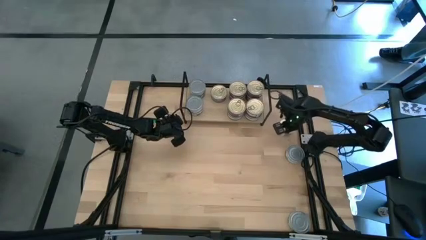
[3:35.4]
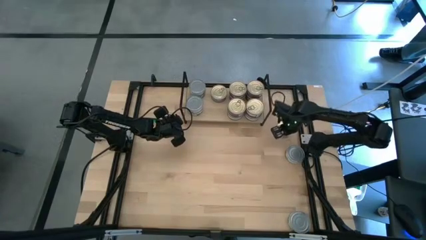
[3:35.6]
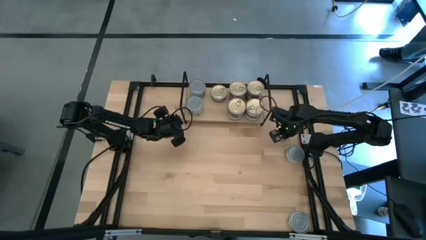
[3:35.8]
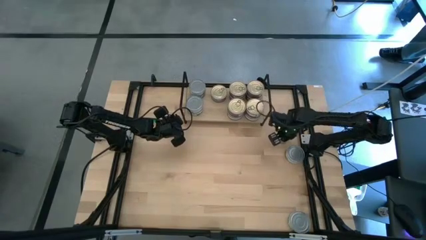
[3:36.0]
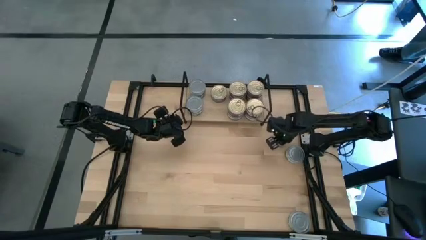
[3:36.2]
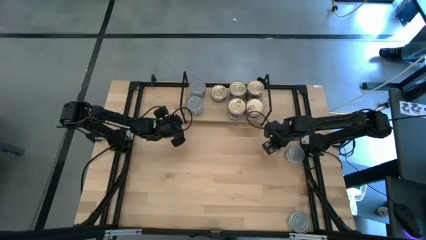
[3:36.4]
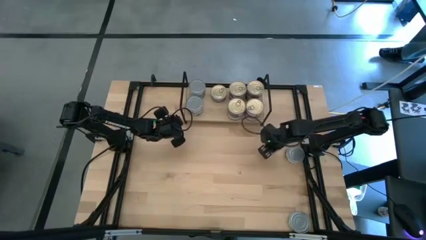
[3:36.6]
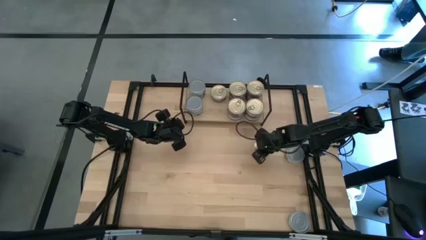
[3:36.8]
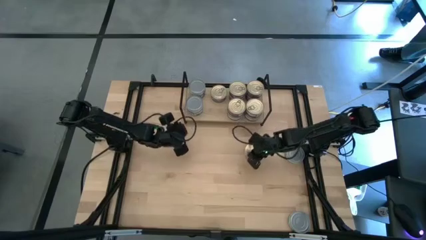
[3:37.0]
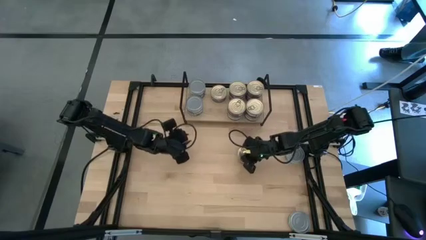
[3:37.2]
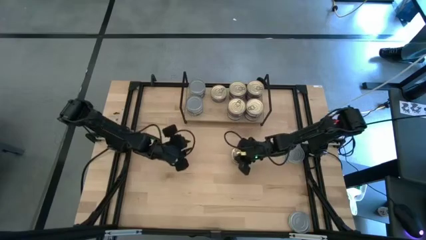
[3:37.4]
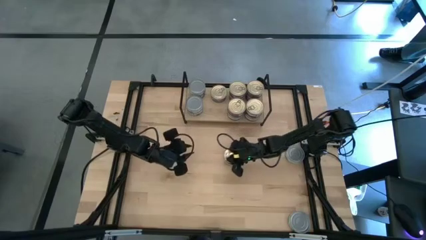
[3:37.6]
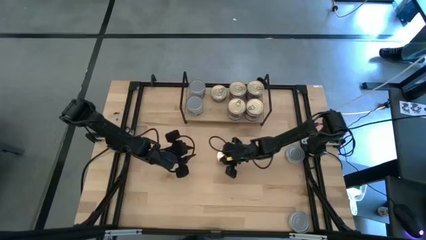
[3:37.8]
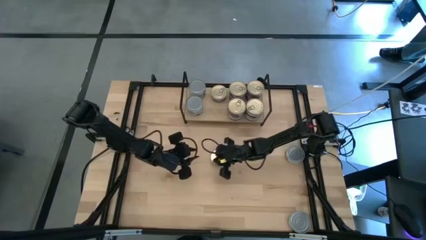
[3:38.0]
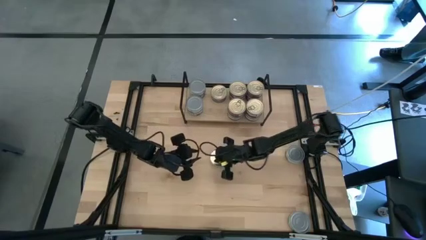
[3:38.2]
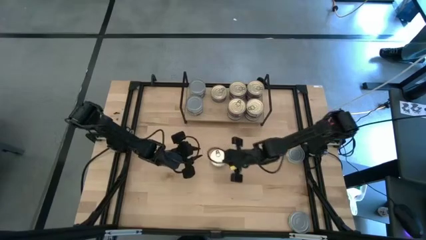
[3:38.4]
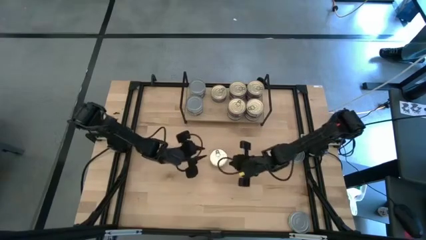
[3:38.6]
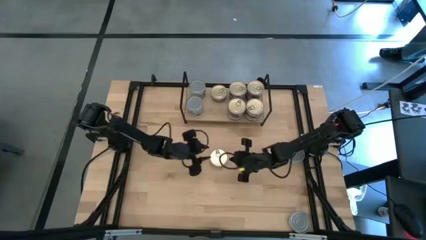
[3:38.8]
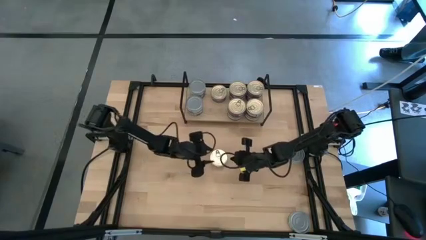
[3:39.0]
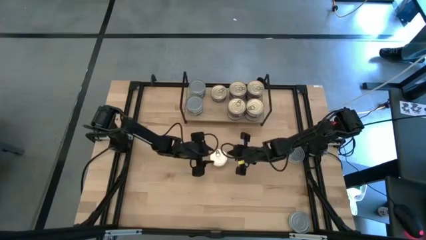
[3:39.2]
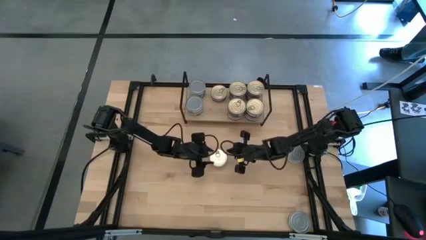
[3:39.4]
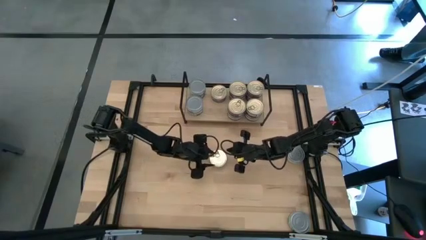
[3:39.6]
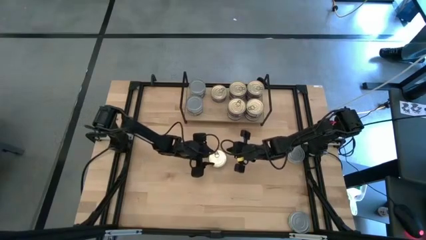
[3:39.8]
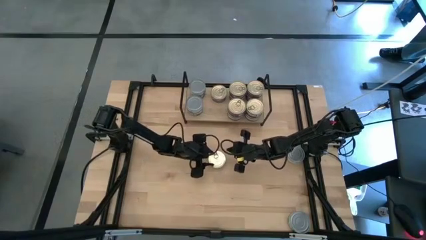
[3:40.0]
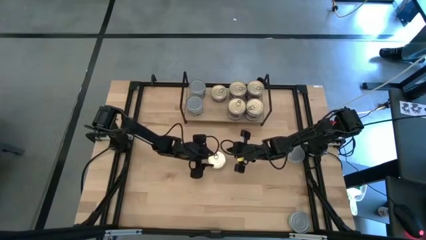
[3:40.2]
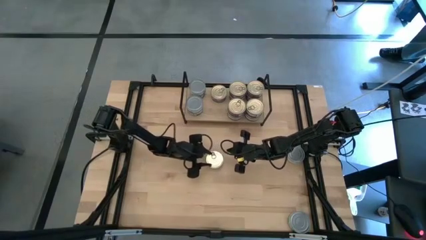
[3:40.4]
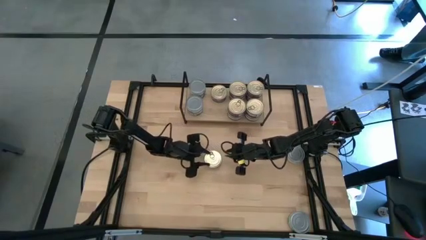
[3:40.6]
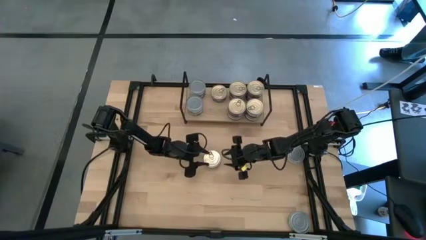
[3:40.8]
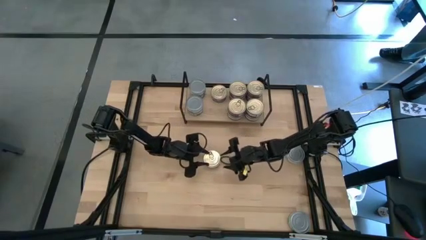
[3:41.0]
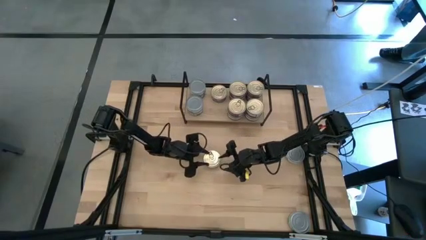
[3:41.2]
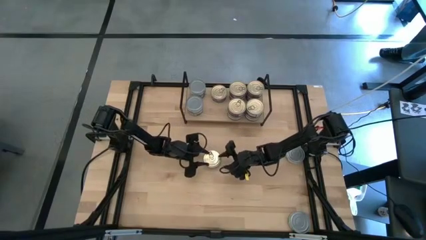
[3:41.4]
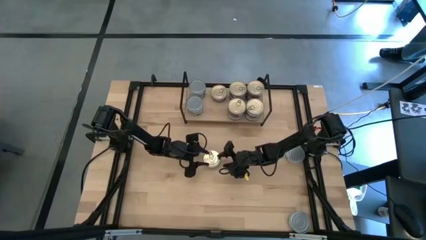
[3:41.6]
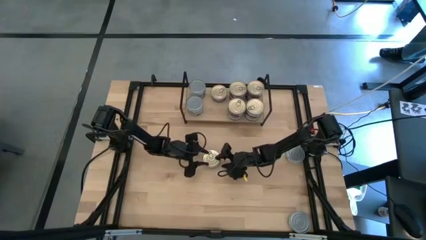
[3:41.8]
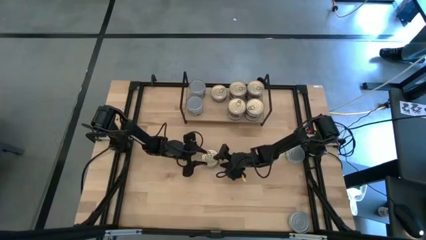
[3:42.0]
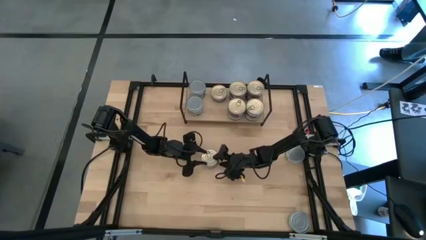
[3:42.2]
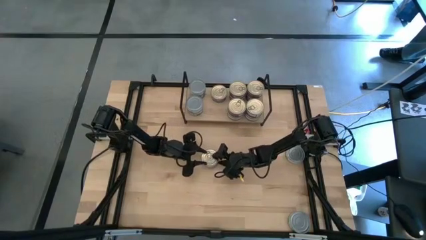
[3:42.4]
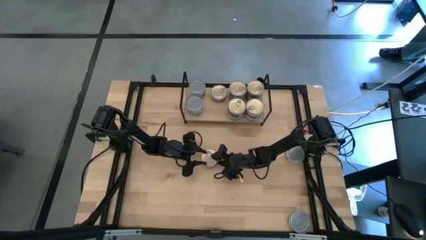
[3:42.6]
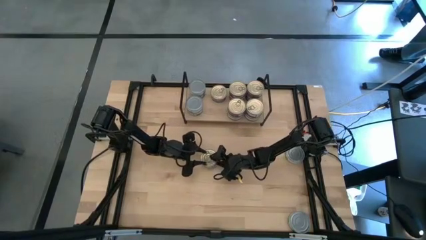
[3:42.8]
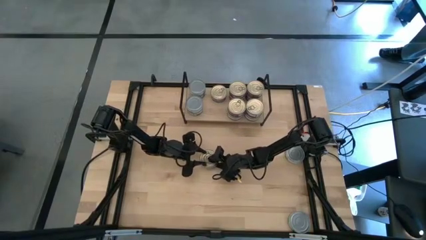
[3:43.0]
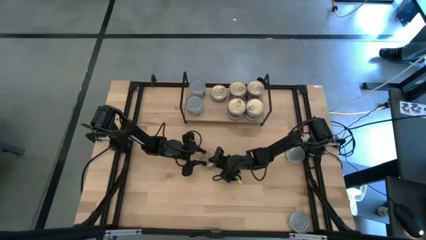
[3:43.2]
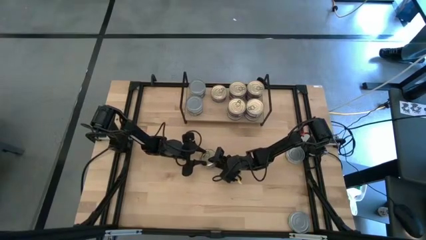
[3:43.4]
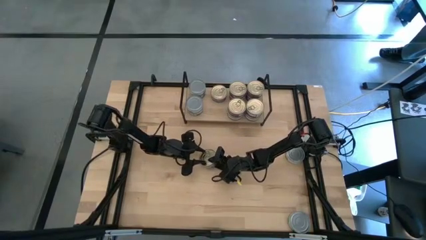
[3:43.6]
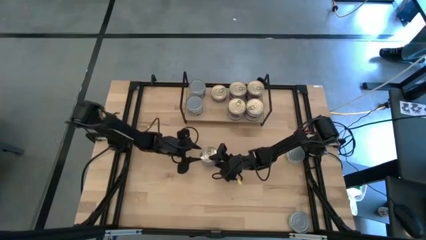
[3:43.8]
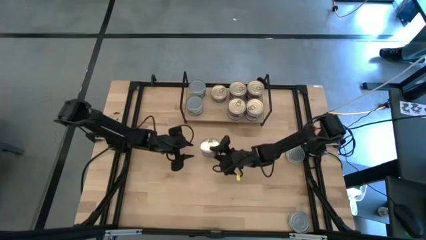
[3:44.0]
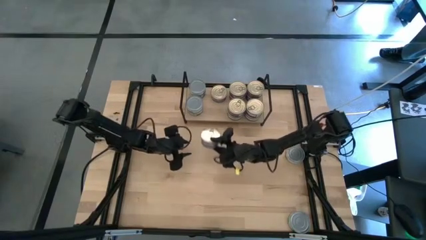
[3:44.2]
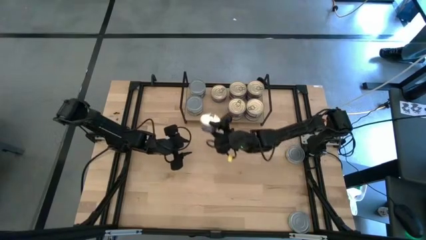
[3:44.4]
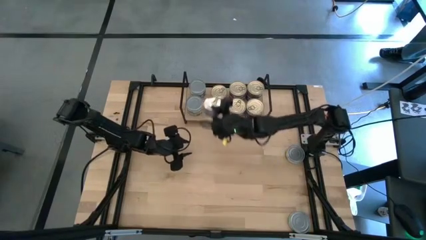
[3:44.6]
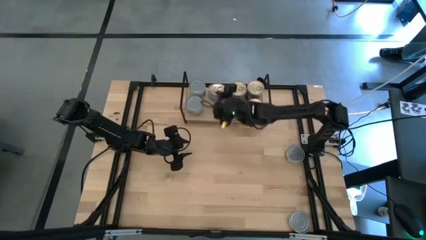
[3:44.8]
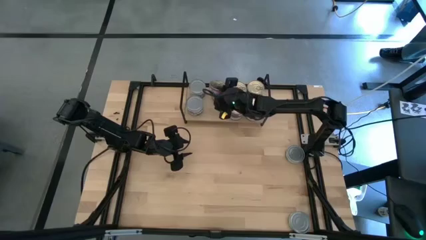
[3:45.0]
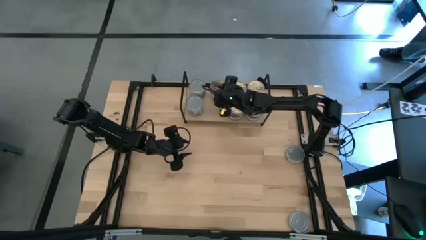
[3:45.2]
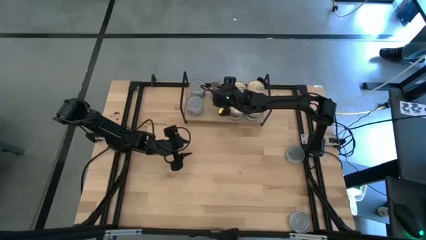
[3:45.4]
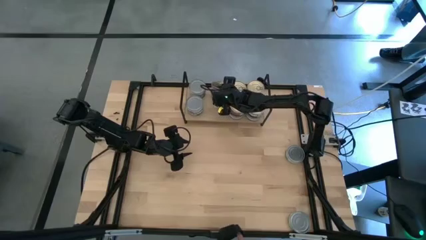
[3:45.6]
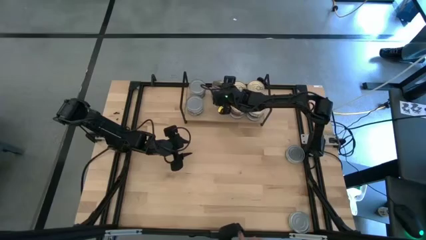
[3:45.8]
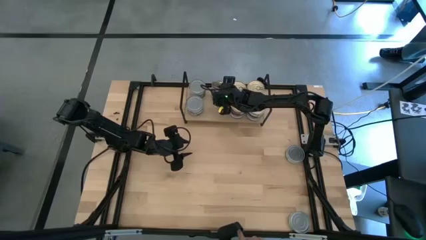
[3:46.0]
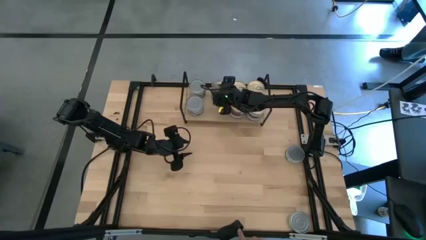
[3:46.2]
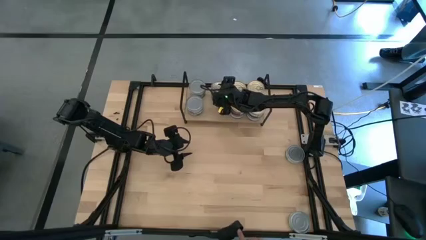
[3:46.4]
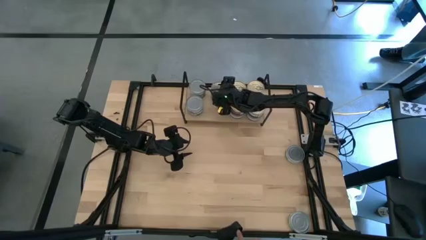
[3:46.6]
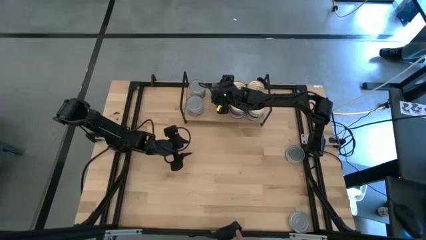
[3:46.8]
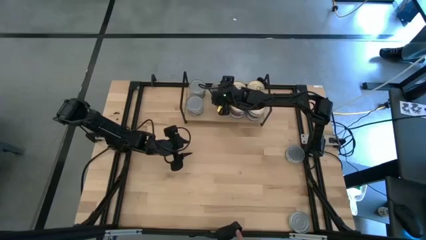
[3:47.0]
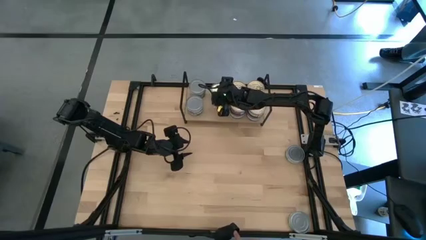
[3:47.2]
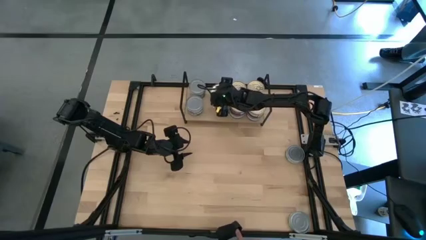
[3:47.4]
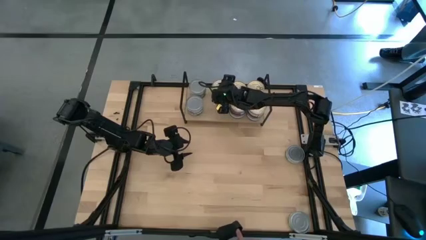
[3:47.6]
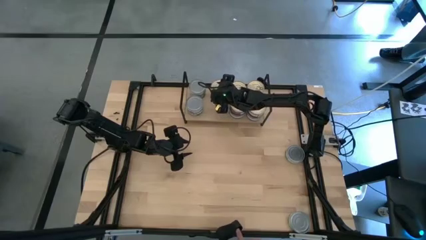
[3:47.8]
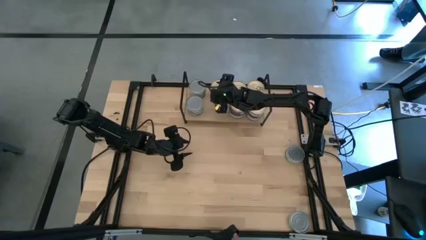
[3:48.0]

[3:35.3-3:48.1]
Task: Stack canned seafood by type on shelf
Stack the blue pink tuna can on top of the other blue pink tuna can on the shelf

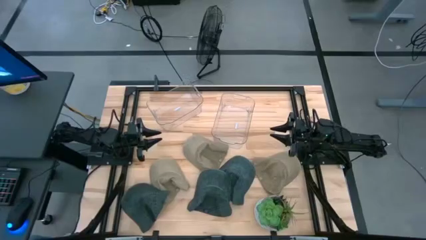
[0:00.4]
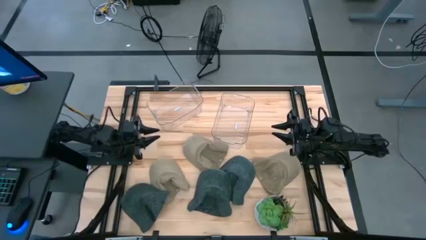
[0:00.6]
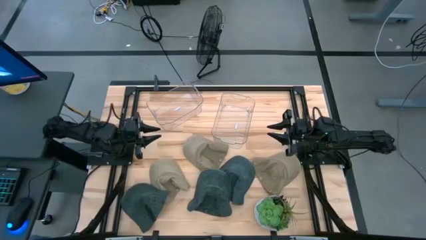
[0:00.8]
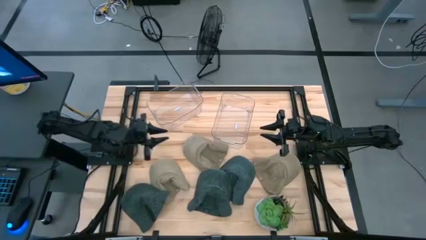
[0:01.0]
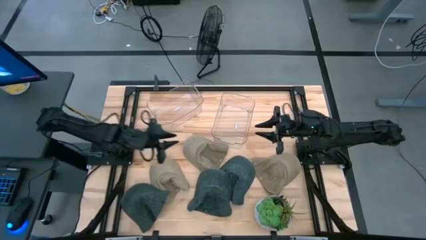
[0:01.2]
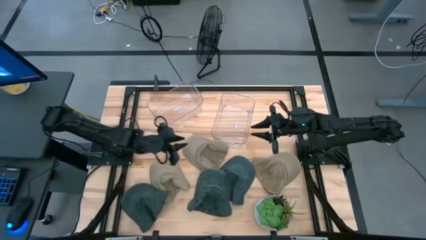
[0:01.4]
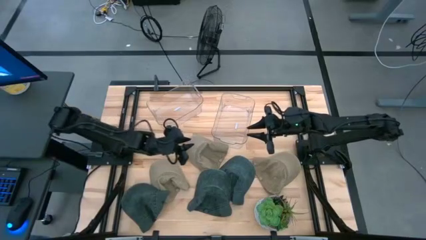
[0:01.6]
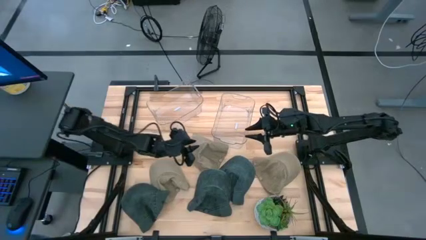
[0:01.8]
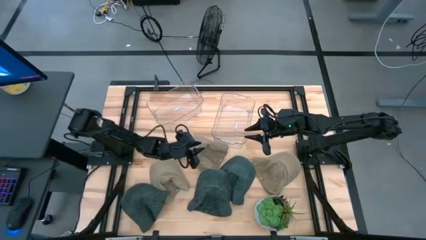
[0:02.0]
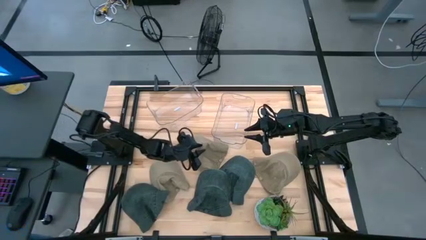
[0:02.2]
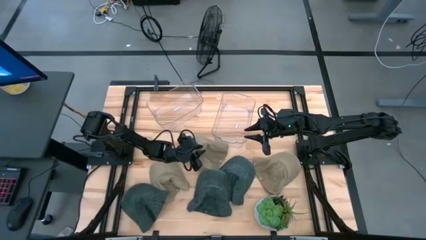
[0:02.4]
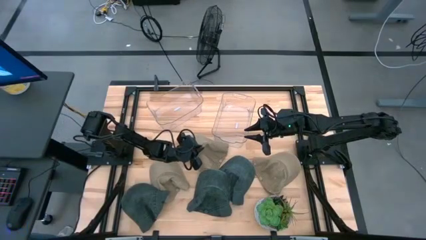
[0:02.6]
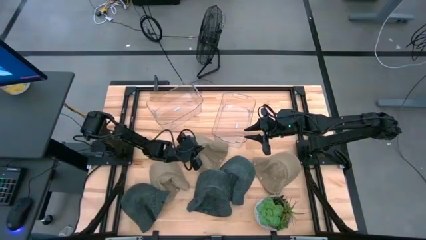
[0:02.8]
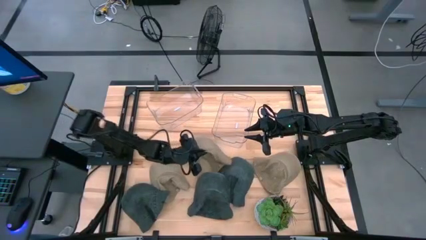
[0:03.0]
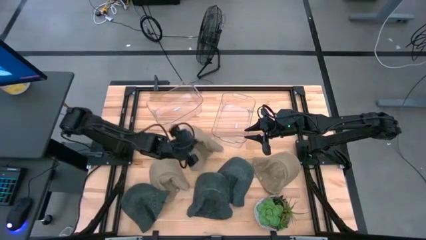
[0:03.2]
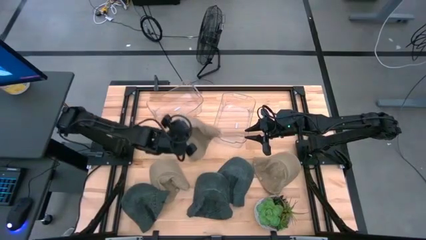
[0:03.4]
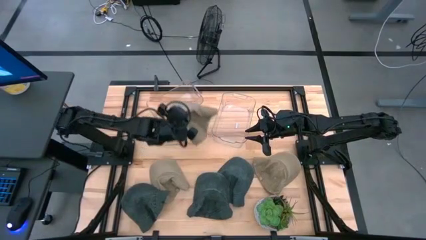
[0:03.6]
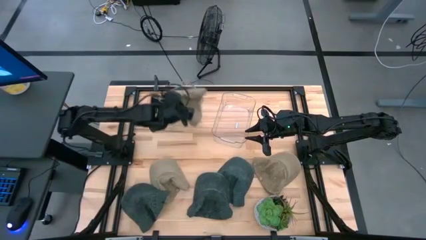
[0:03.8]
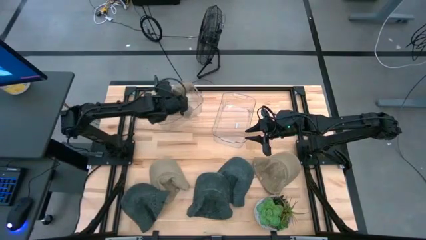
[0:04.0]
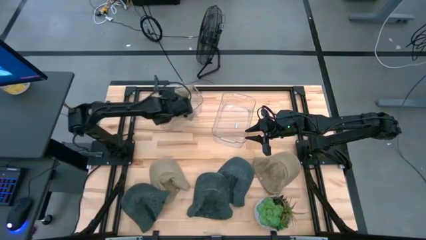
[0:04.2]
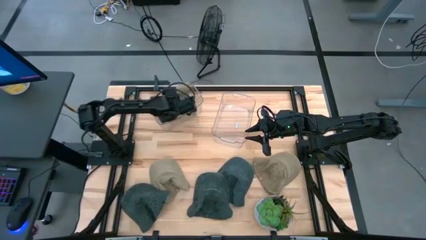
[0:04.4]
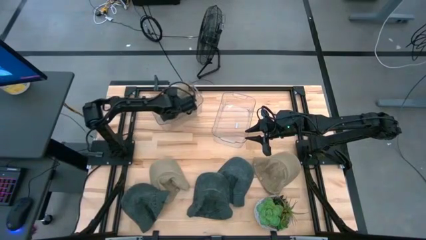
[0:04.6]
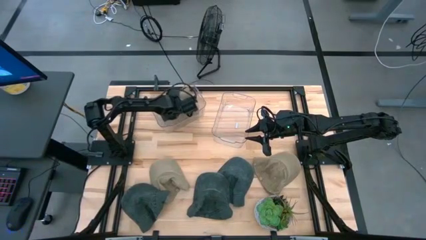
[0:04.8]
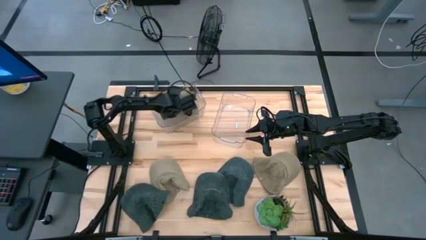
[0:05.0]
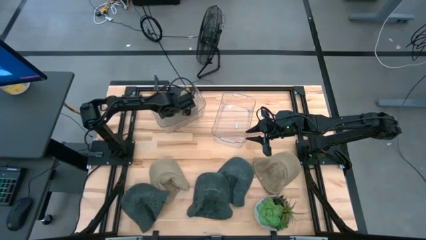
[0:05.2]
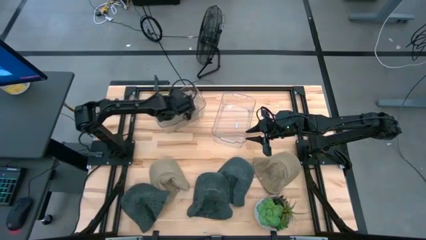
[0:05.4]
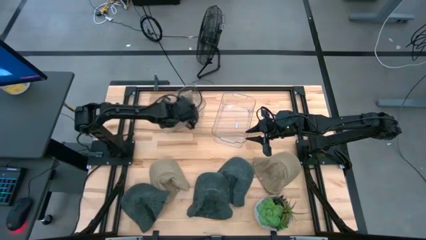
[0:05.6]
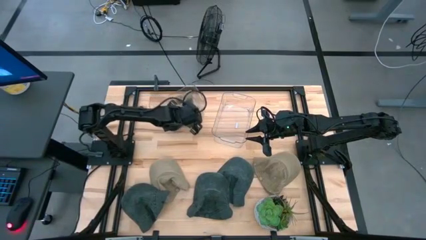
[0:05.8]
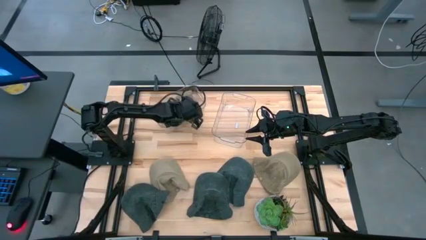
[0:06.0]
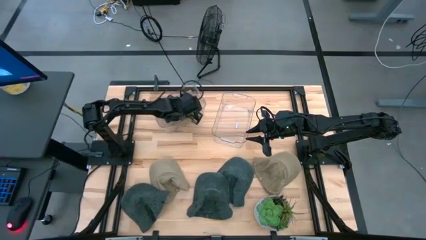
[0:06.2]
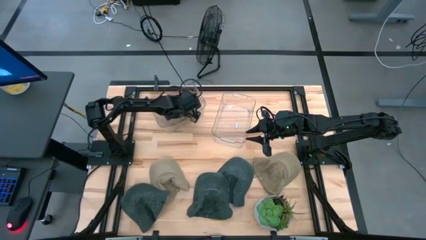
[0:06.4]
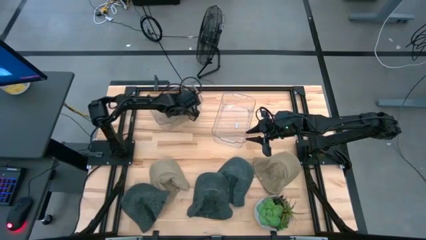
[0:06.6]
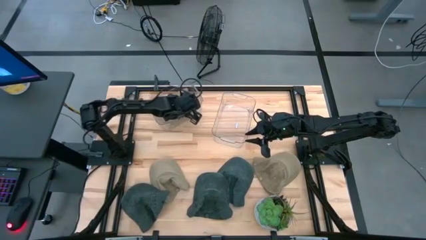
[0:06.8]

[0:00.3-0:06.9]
Task: Pick & Place hat
Put the middle brown cap into the left transparent bin
